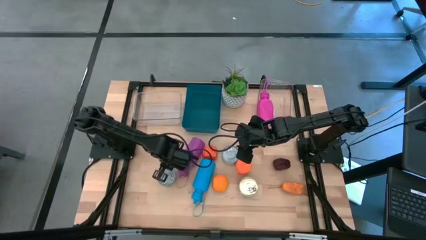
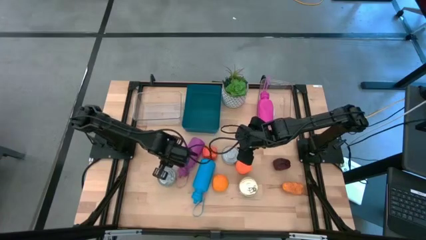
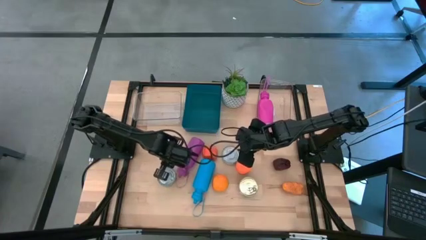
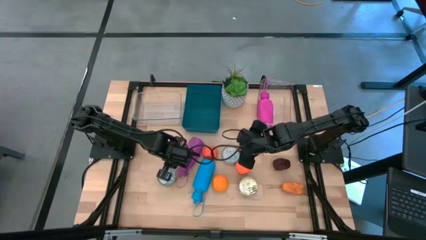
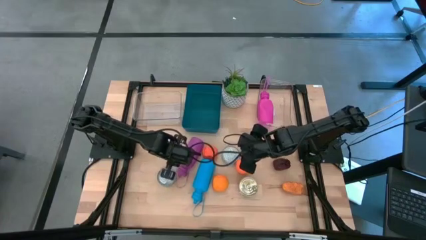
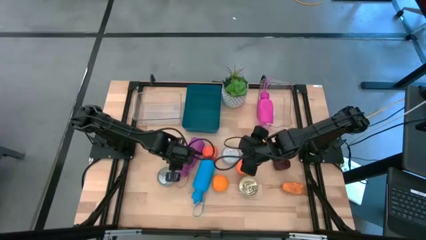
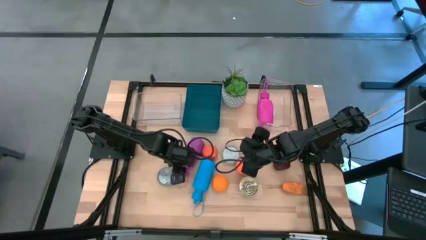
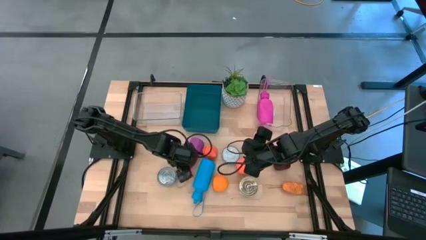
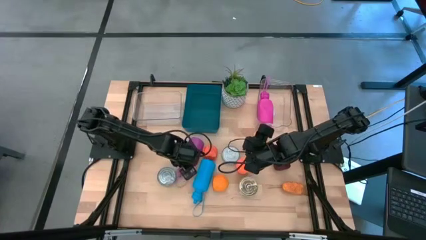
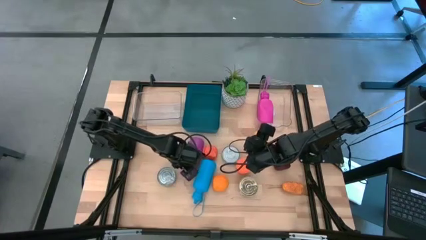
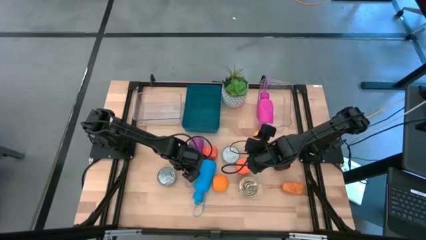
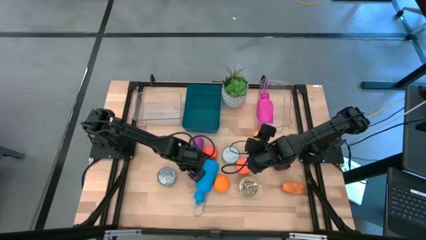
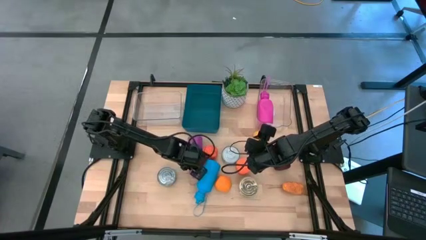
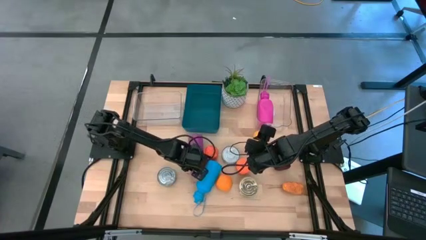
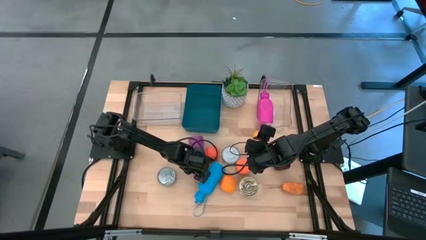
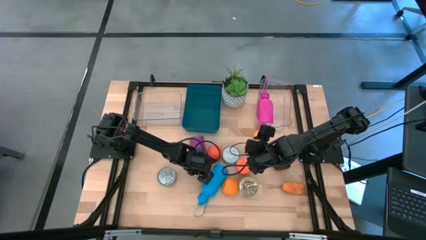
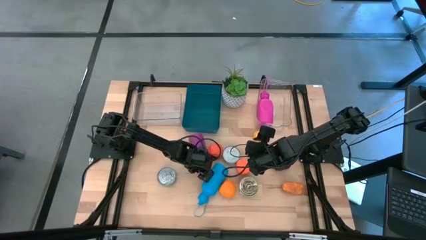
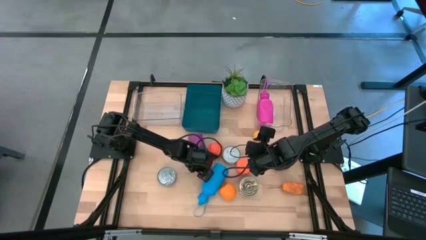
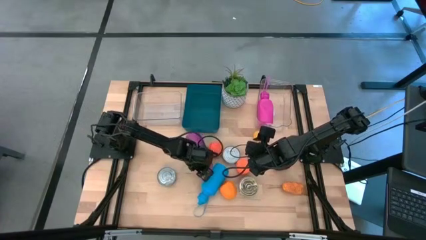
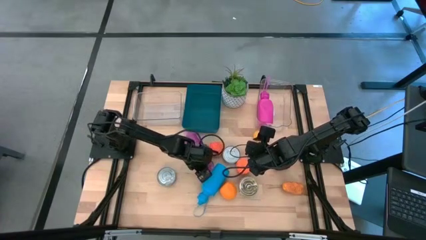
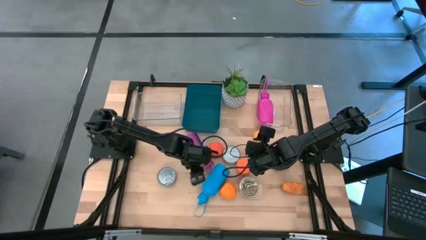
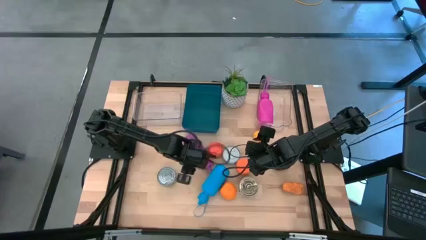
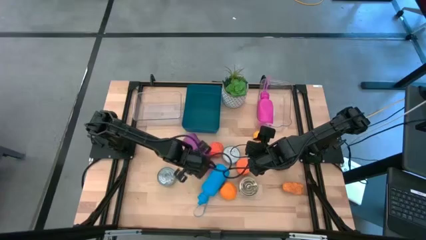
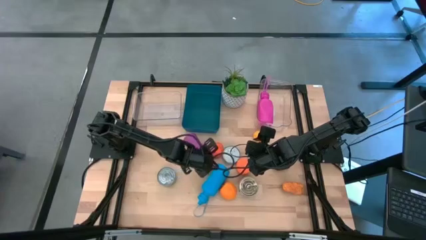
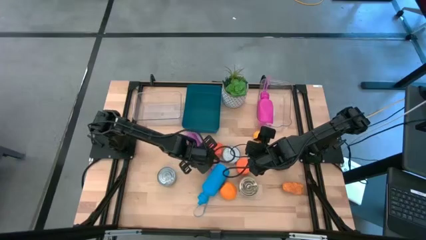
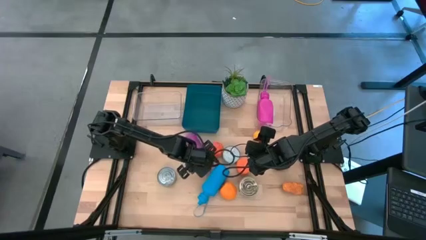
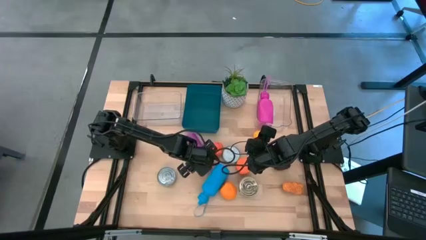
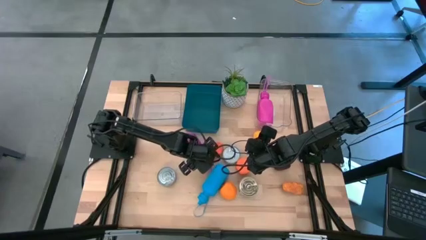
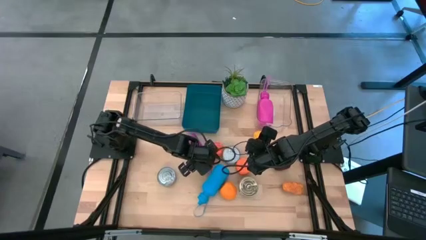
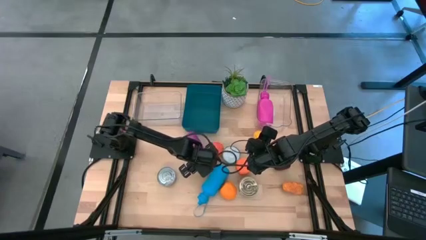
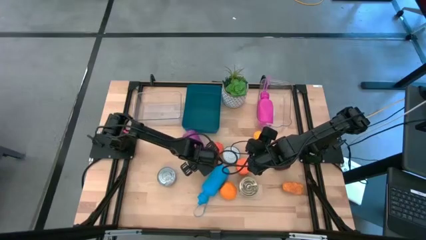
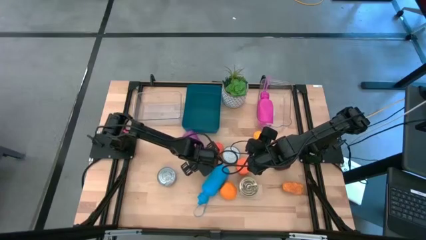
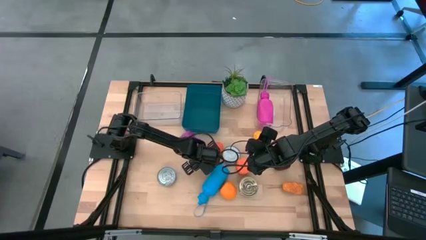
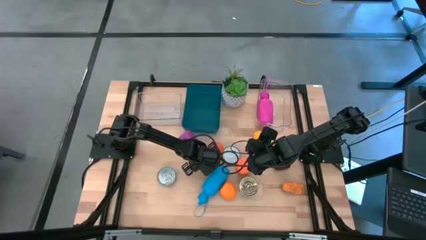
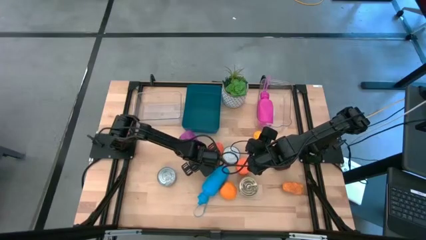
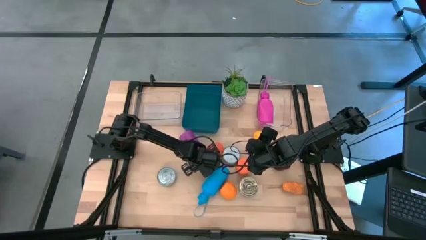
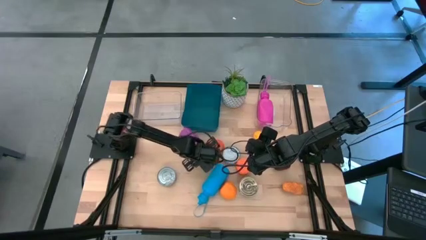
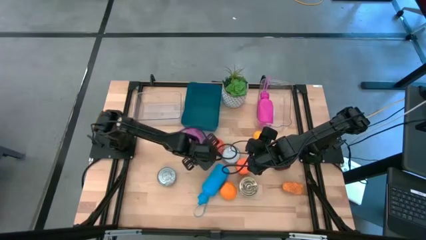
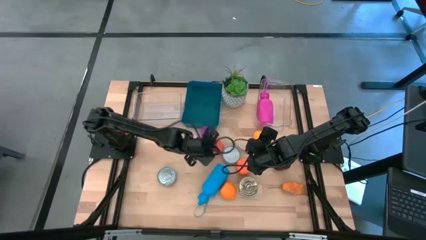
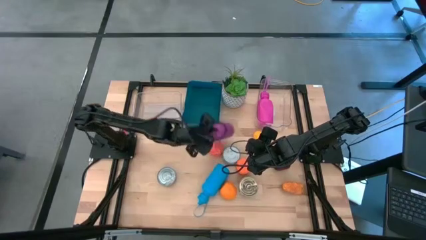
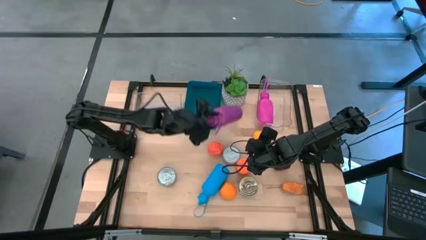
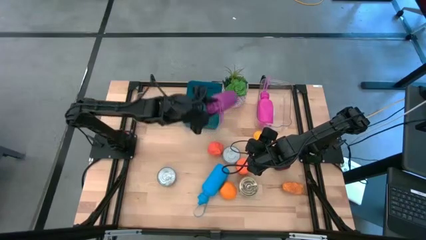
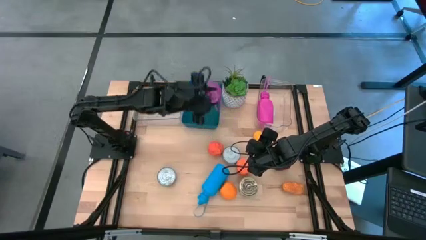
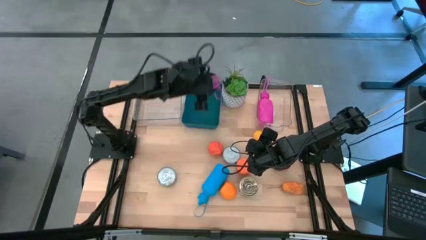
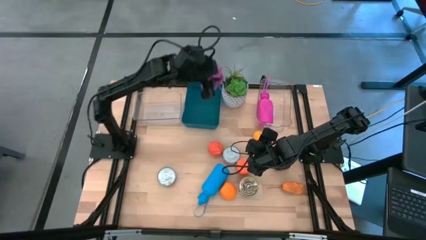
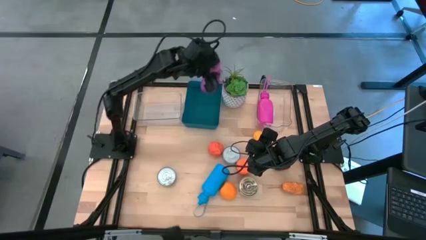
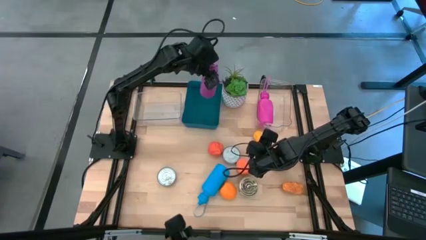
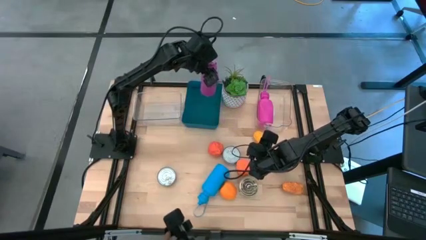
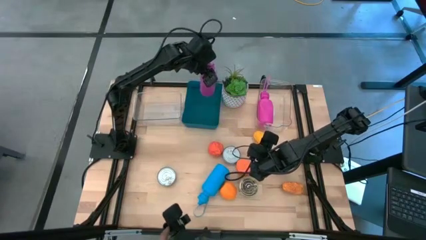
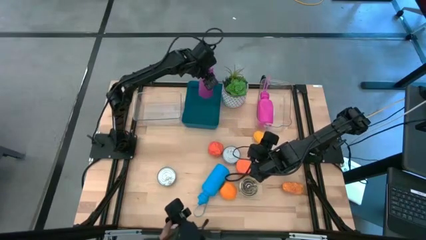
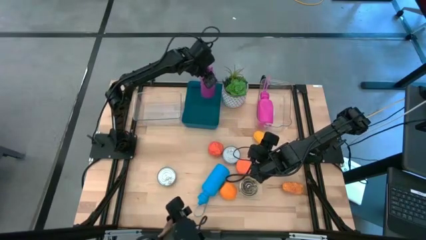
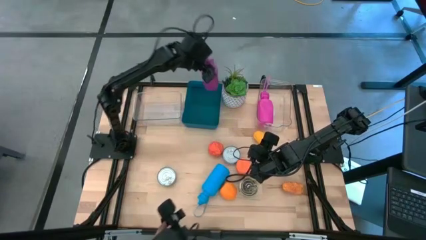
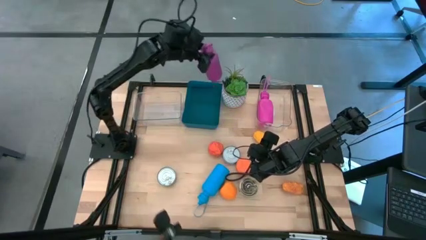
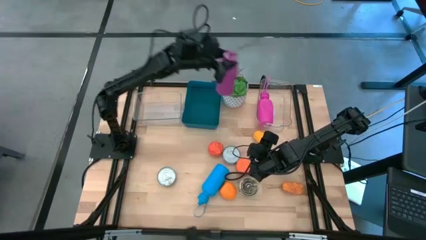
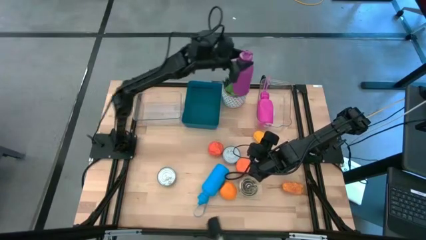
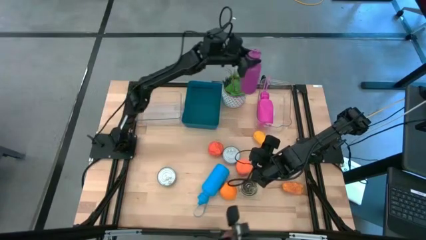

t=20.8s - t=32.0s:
Task: Pick & Place Food Item
Put the purple water bottle into the right transparent bin

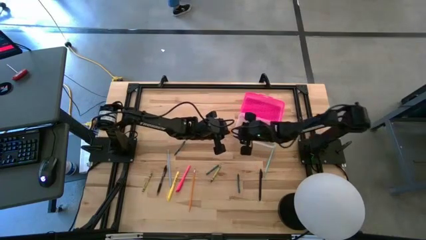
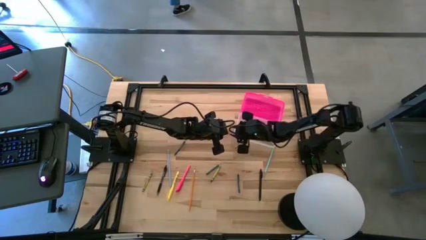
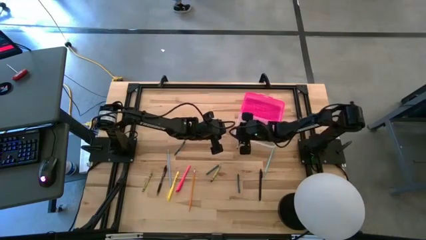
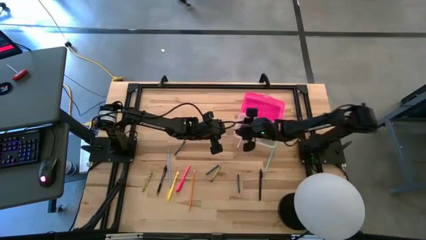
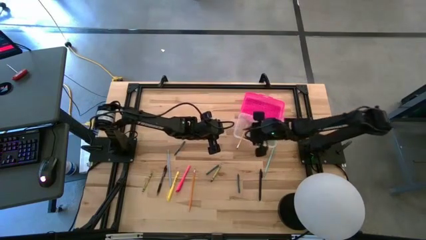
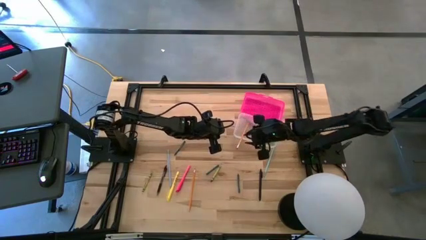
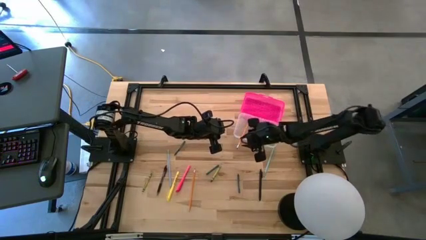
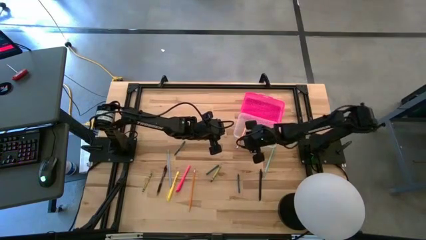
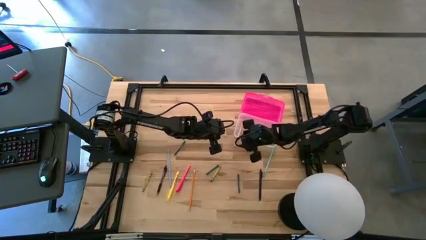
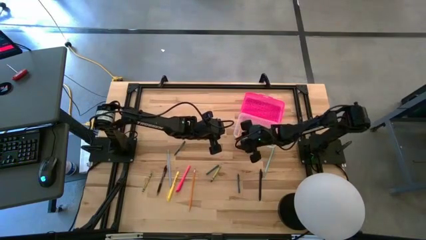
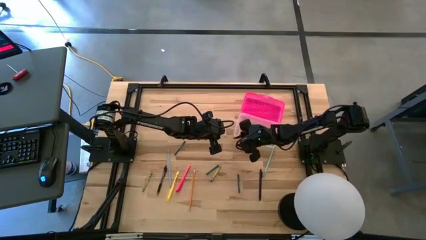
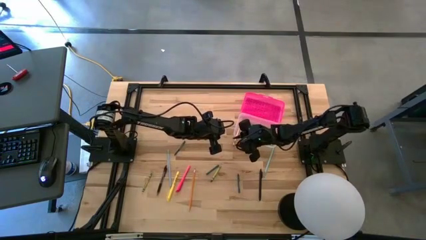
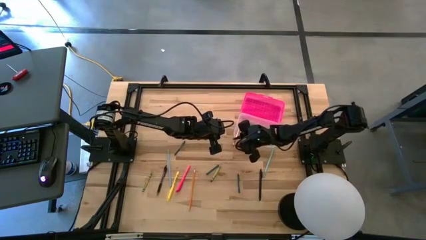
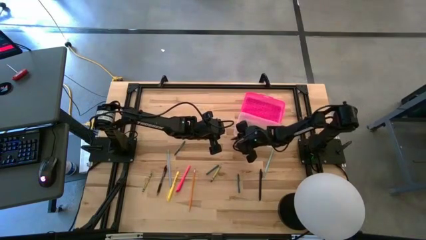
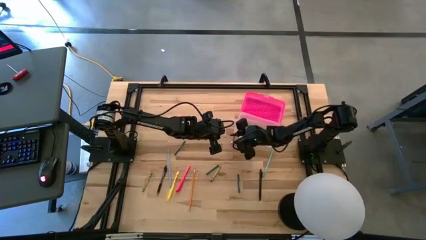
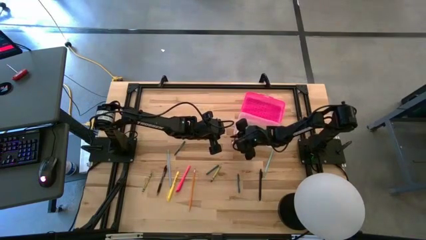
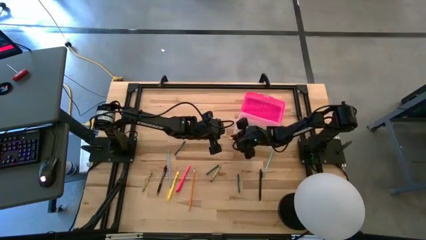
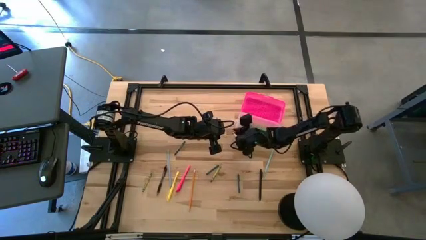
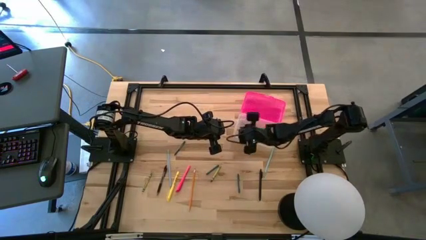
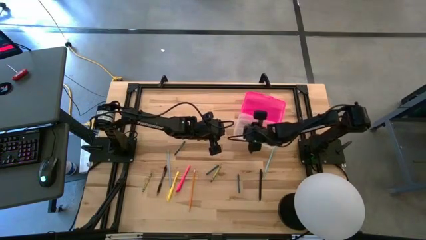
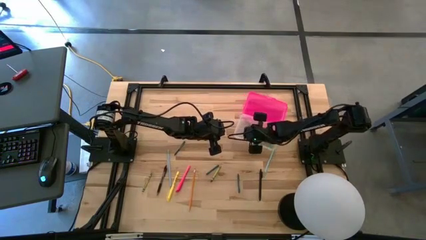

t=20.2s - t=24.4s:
Task: Pick & place school supplies into a supply box
Put the top orange pencil into the pink supply box
